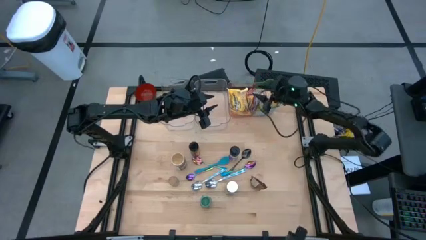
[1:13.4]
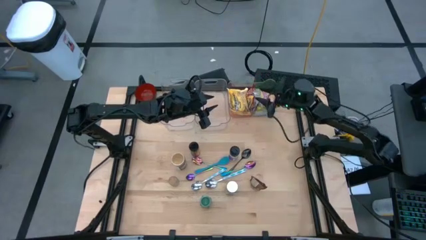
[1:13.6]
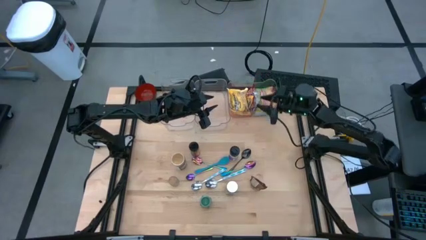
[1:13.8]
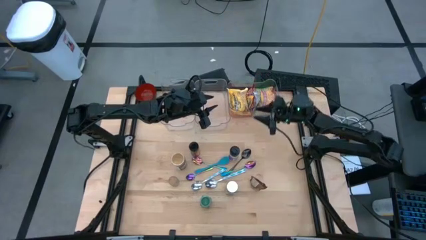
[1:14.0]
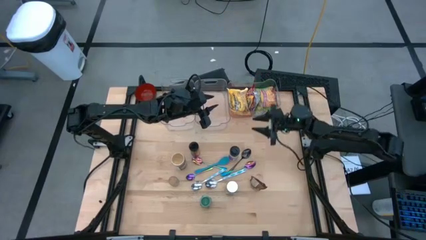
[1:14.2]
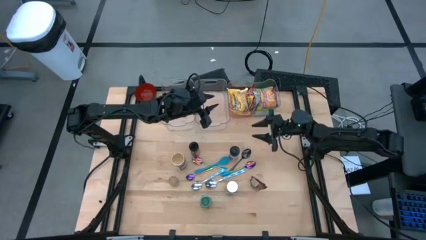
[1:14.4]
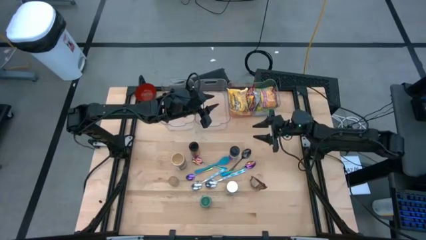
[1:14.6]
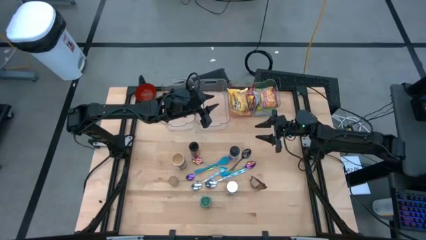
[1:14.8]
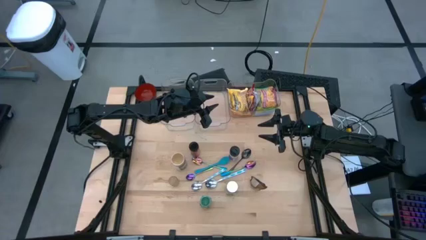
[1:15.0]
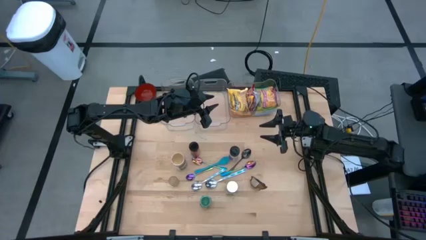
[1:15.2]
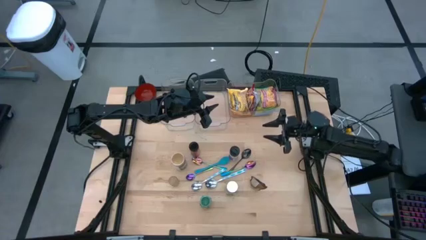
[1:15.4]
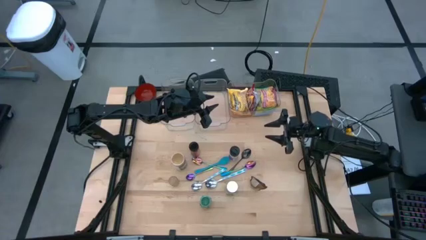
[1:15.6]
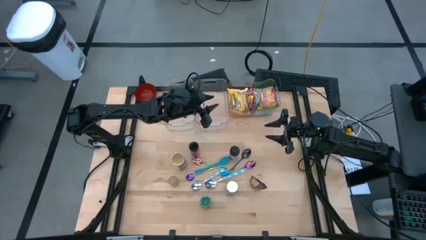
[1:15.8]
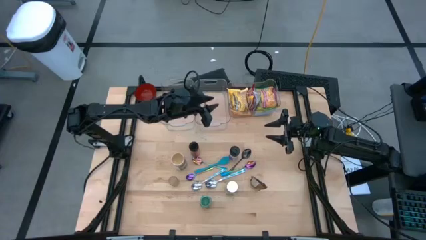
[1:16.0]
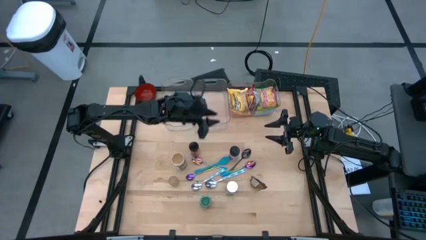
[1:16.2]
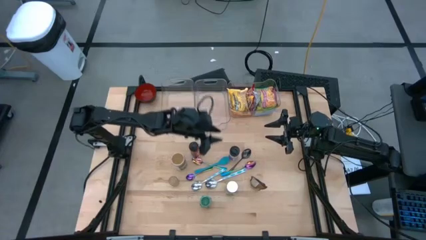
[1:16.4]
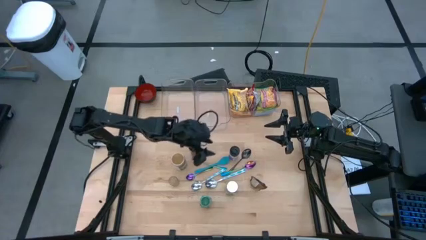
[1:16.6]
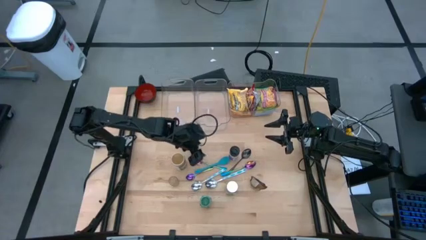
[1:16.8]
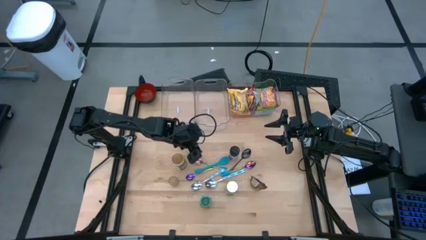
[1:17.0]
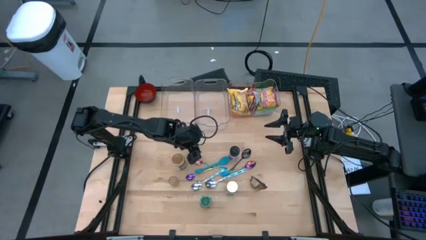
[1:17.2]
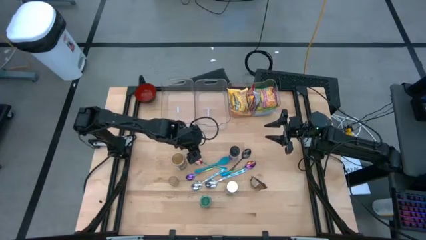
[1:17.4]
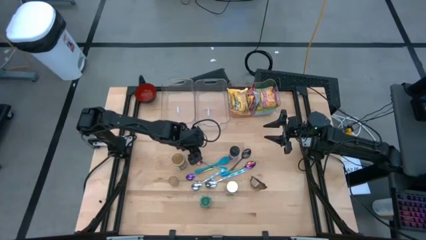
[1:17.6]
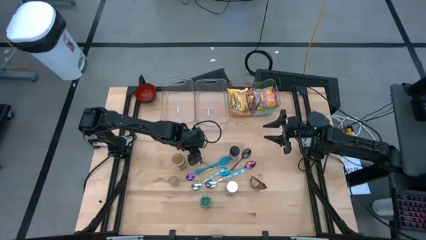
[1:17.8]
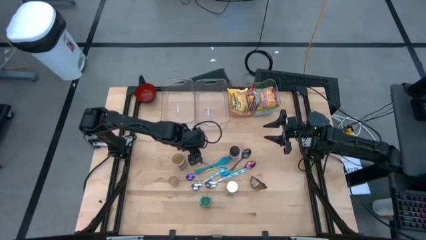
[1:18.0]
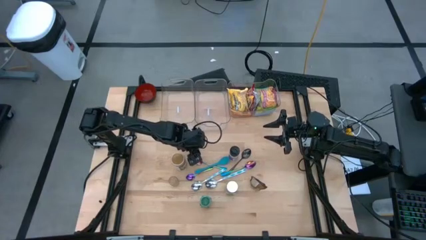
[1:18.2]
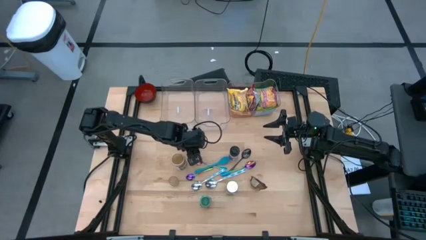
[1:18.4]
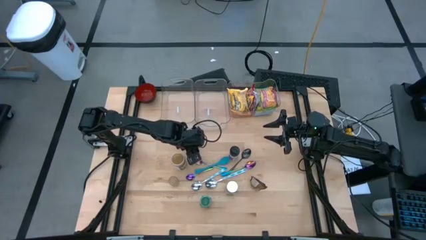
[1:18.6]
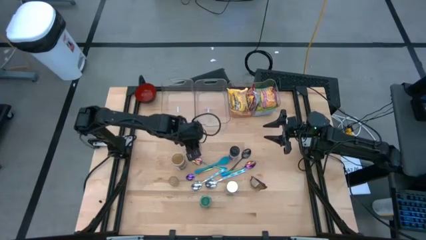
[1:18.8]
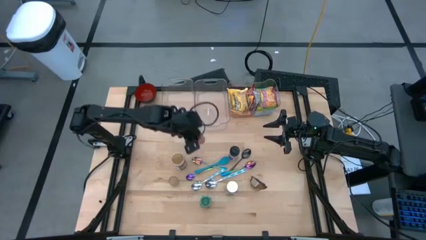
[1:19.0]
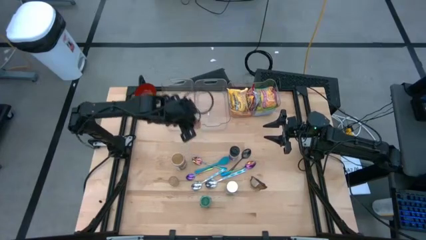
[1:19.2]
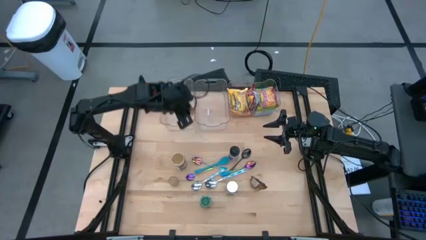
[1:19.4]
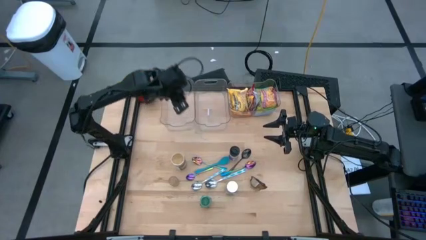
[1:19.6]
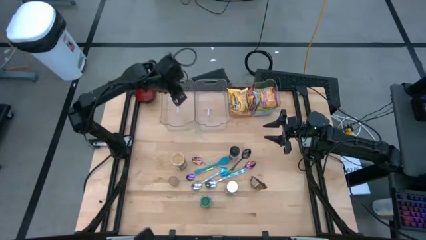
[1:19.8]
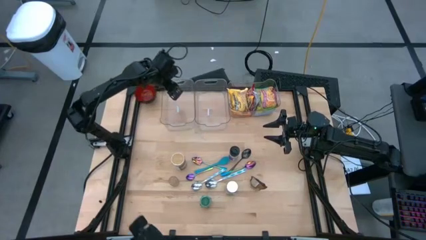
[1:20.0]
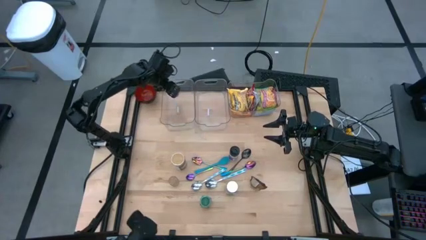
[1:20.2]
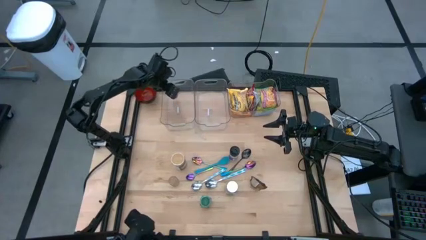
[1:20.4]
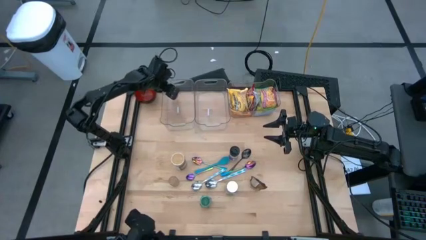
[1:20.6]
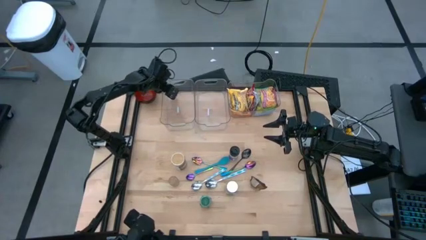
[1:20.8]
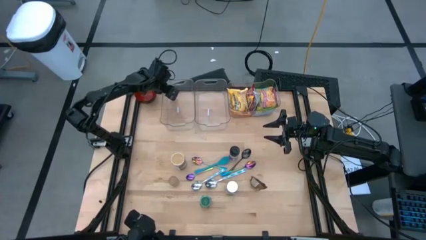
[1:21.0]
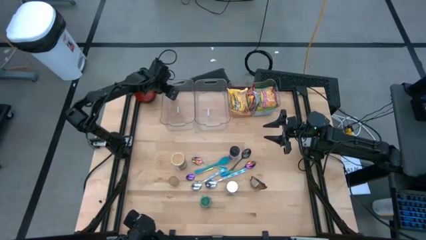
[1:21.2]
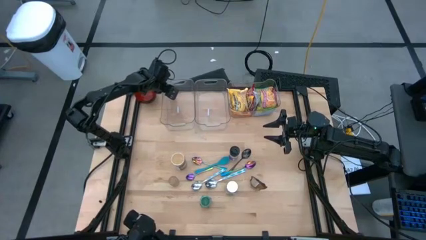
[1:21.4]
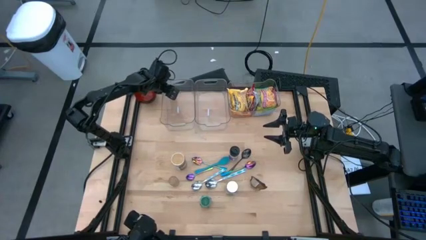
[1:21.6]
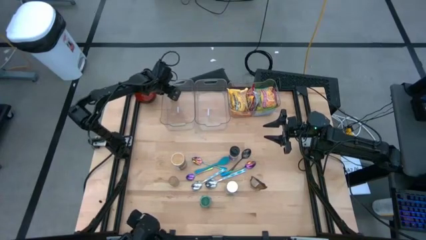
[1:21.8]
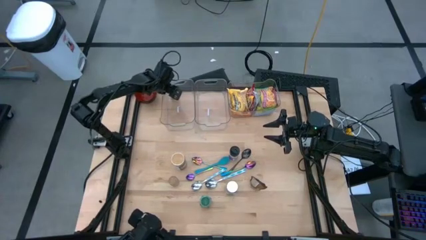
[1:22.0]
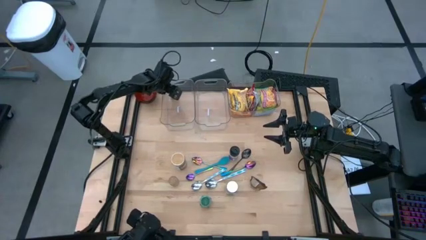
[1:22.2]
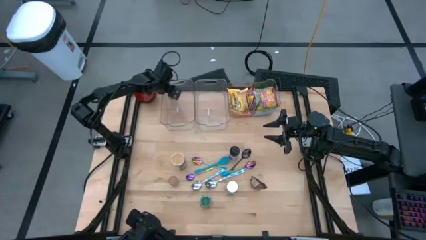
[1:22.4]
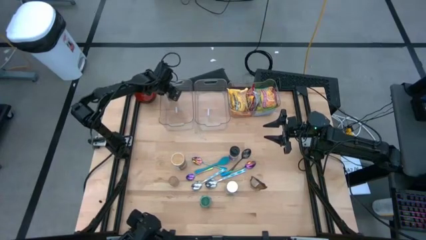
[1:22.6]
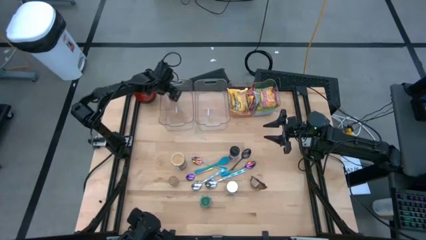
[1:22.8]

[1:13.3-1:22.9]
Task: Pick & Place Food Item
Put the orange seasoning bottle into the left transparent bin
